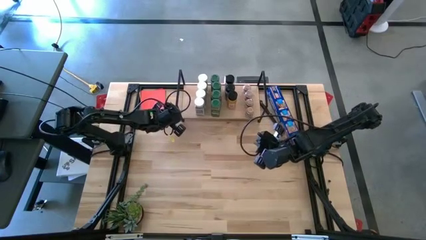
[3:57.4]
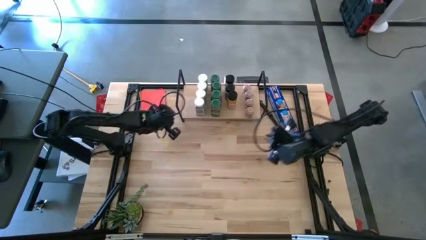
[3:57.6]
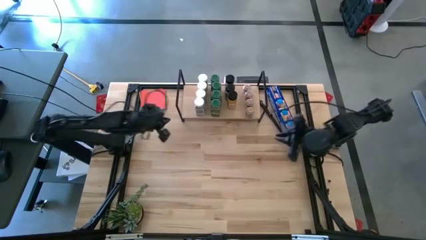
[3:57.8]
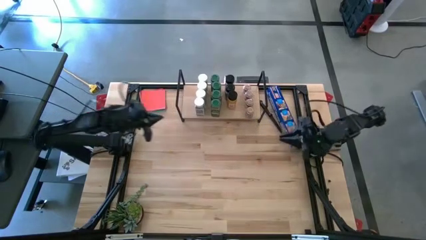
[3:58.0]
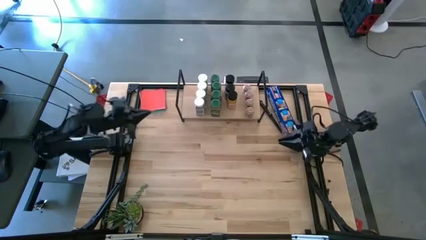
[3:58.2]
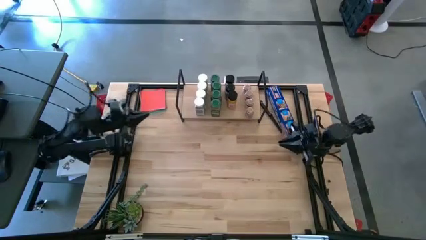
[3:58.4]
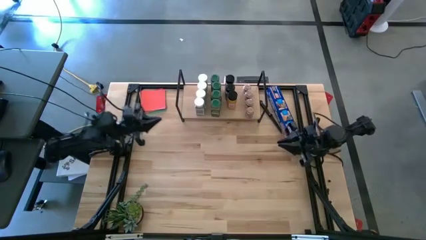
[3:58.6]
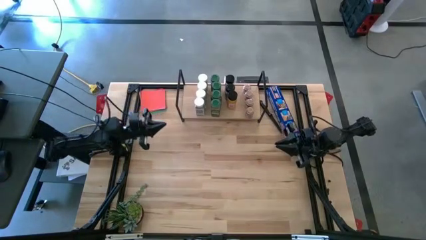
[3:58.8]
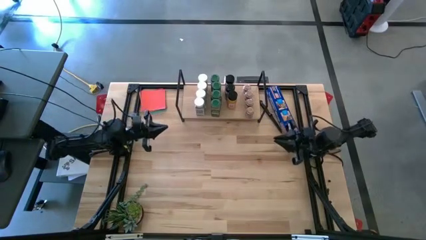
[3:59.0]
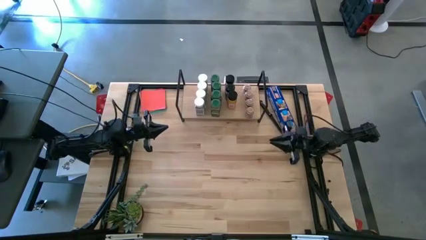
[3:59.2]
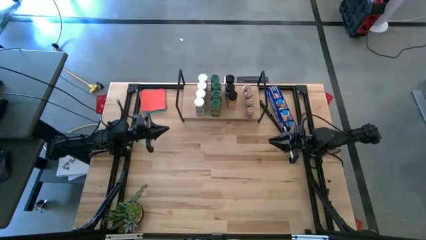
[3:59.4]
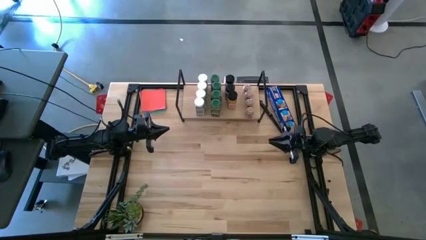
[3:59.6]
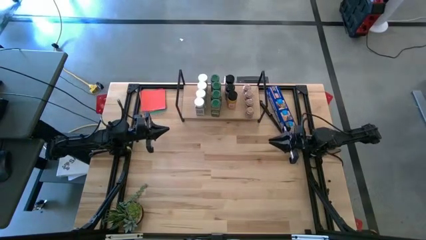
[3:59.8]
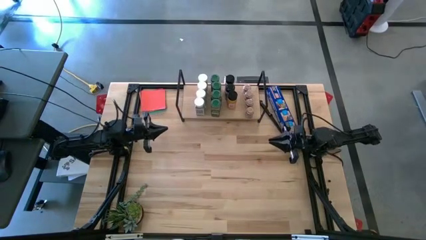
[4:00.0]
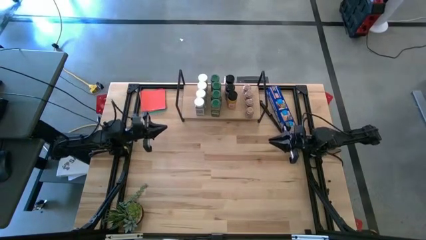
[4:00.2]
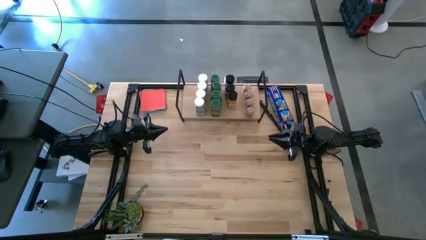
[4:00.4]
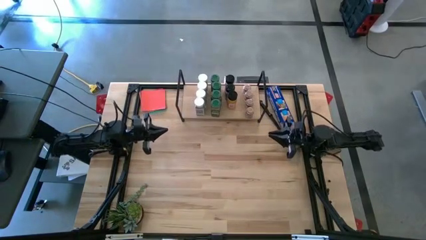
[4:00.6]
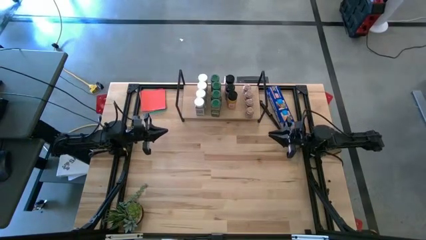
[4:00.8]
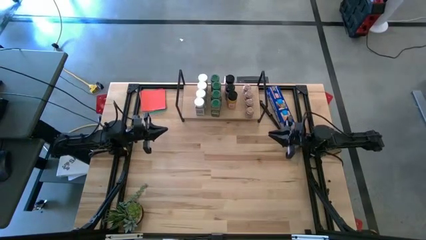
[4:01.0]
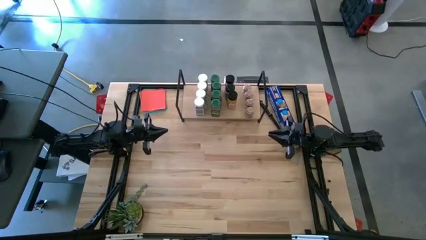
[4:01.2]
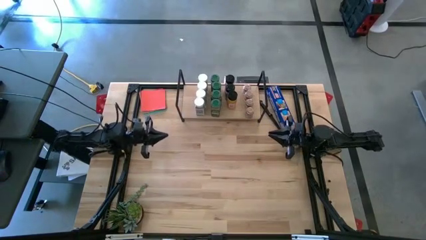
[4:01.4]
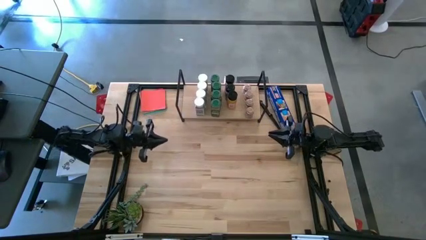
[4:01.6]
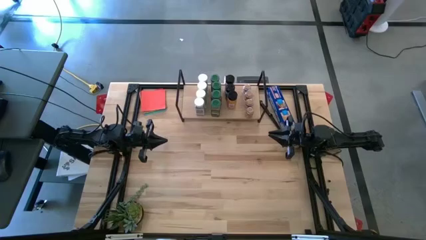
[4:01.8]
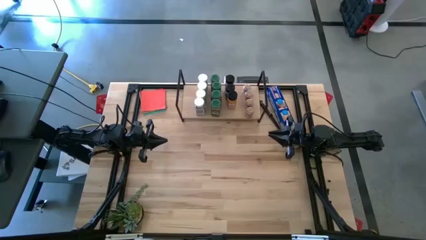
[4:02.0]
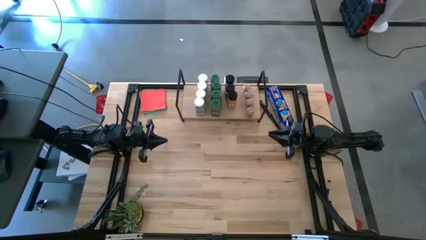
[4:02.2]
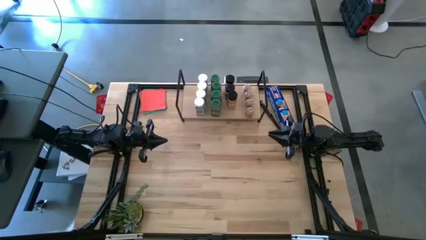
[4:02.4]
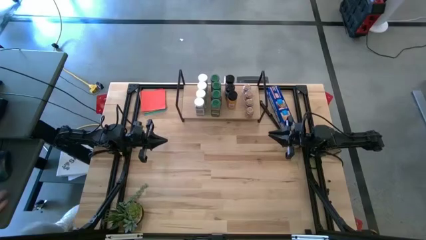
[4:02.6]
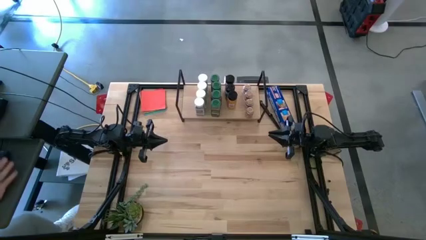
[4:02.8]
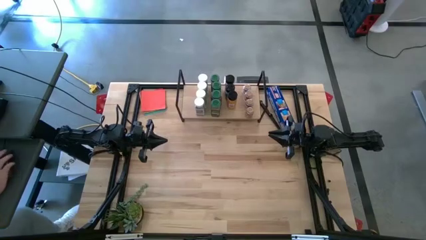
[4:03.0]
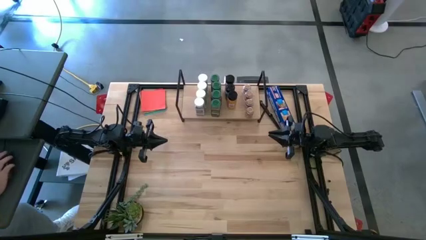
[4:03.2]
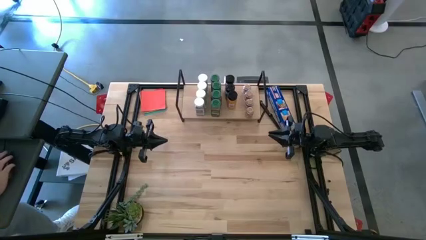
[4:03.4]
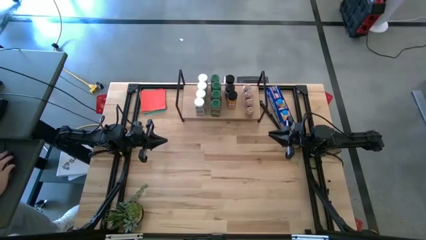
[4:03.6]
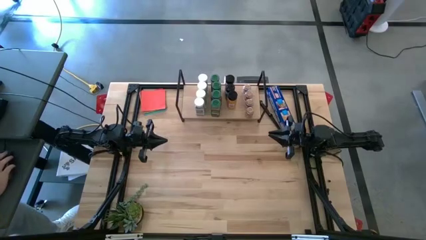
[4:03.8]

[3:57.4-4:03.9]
Task: Shelf spices
Return to Home Position

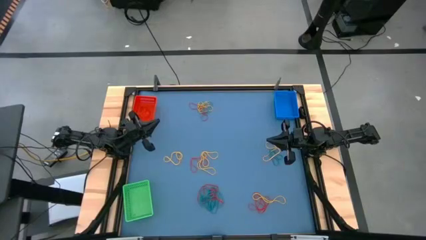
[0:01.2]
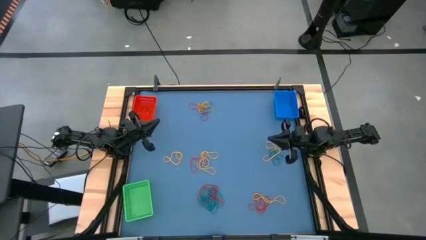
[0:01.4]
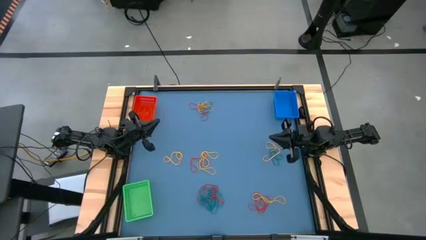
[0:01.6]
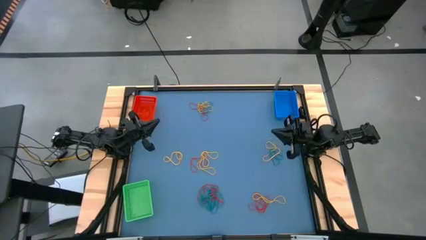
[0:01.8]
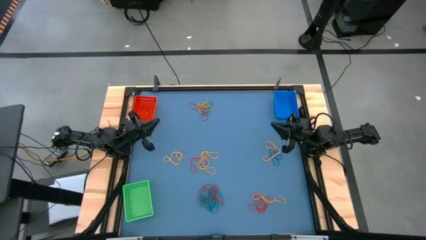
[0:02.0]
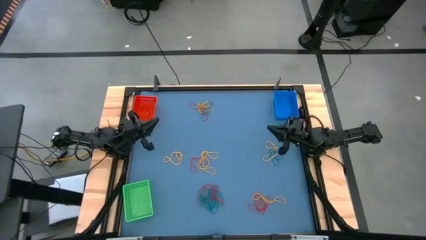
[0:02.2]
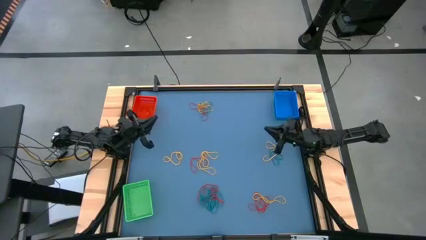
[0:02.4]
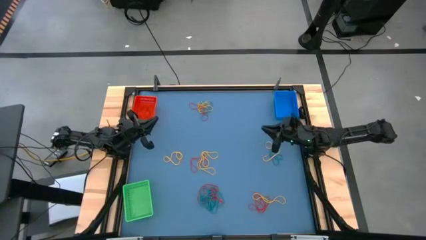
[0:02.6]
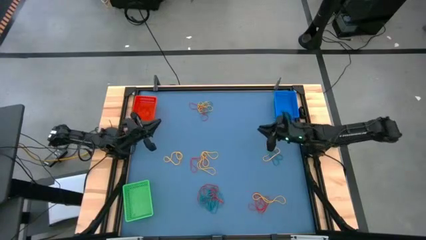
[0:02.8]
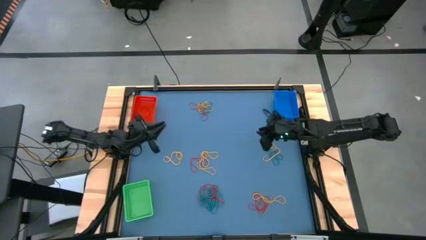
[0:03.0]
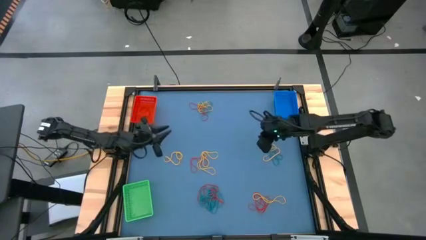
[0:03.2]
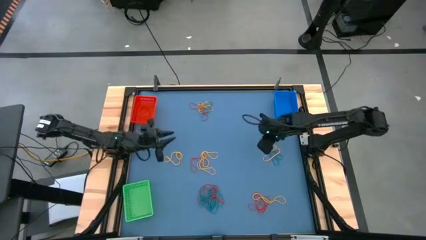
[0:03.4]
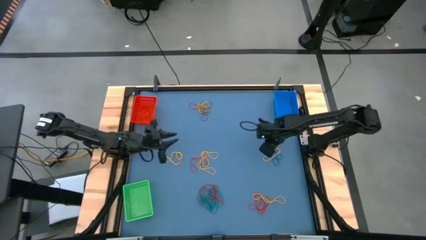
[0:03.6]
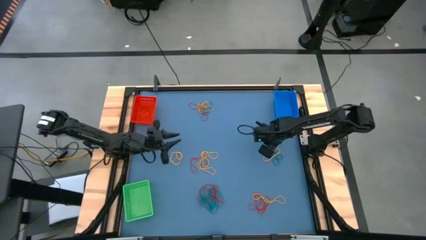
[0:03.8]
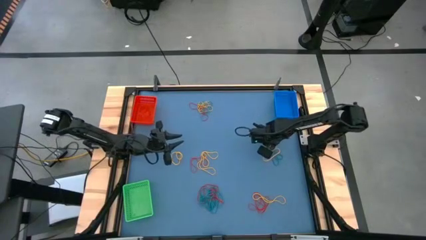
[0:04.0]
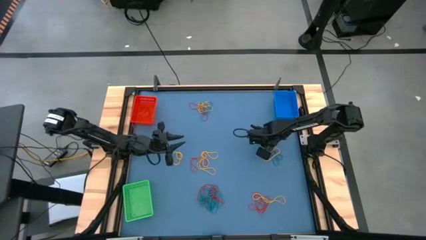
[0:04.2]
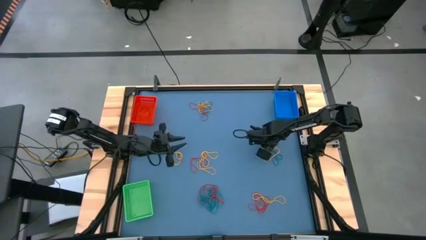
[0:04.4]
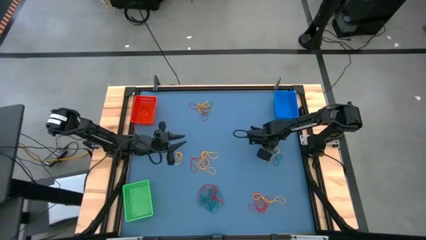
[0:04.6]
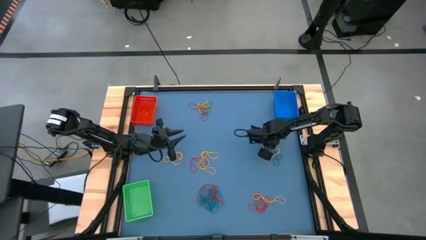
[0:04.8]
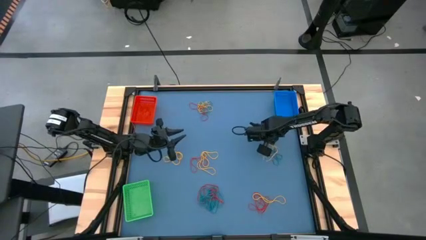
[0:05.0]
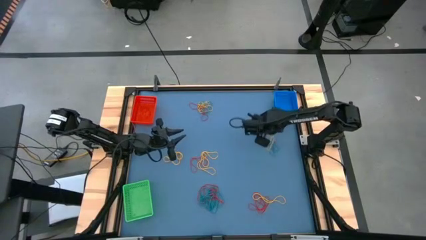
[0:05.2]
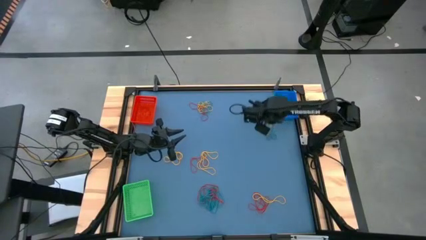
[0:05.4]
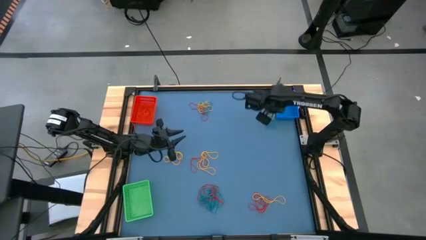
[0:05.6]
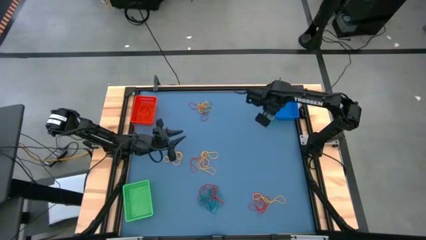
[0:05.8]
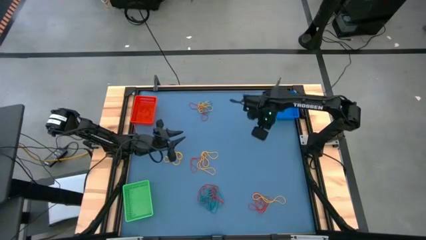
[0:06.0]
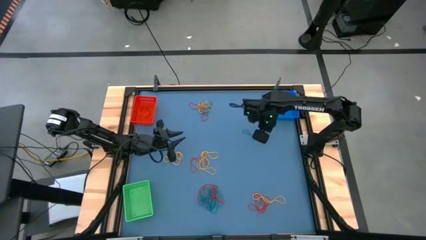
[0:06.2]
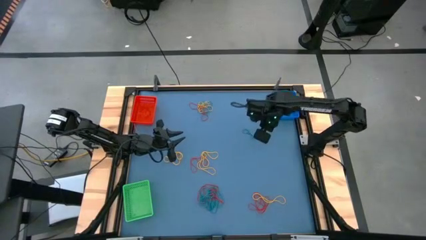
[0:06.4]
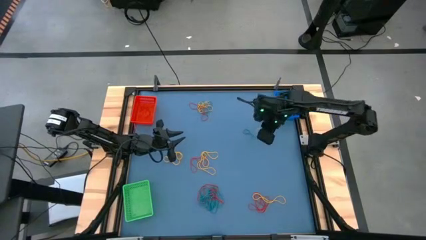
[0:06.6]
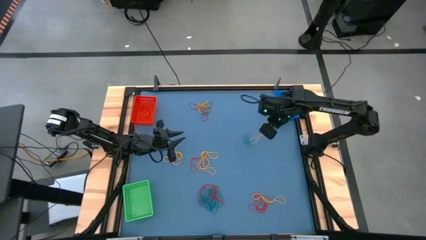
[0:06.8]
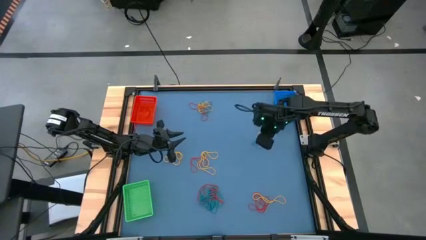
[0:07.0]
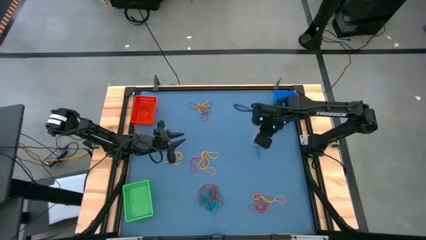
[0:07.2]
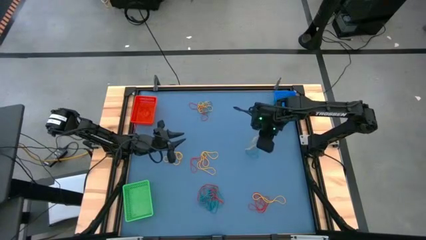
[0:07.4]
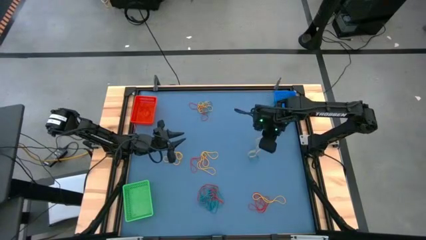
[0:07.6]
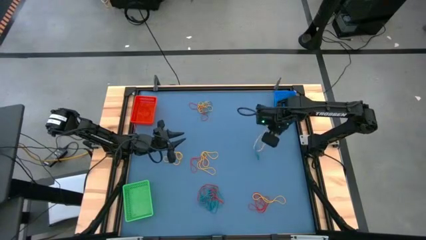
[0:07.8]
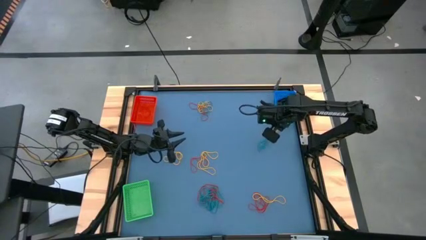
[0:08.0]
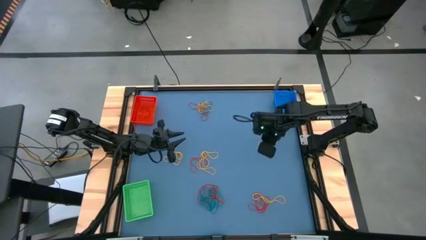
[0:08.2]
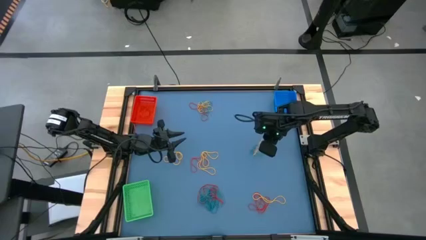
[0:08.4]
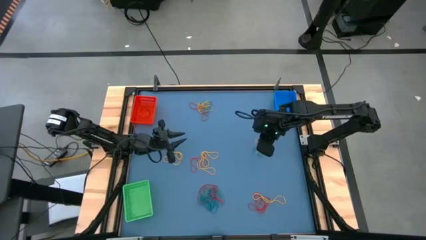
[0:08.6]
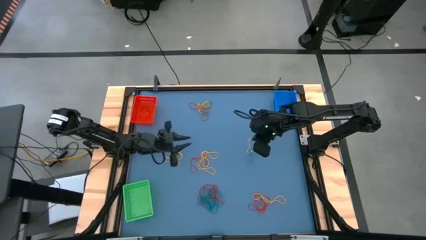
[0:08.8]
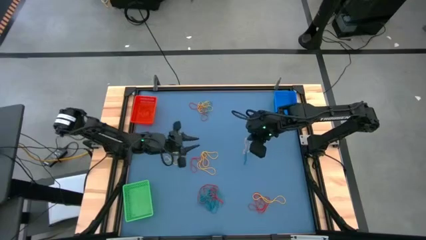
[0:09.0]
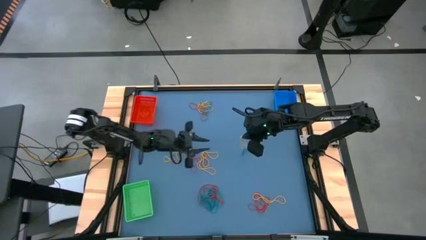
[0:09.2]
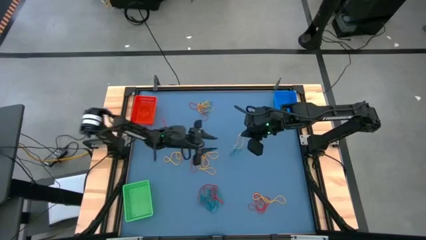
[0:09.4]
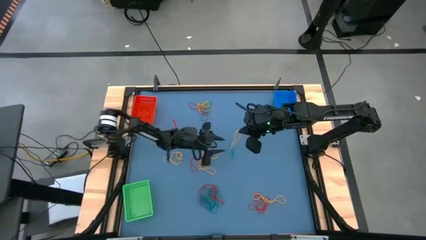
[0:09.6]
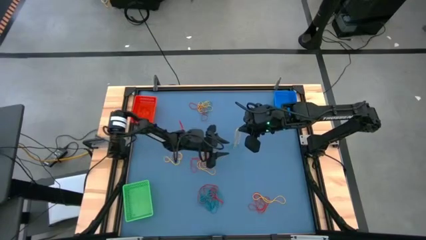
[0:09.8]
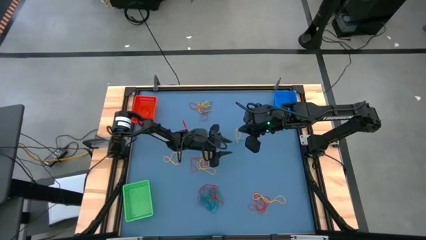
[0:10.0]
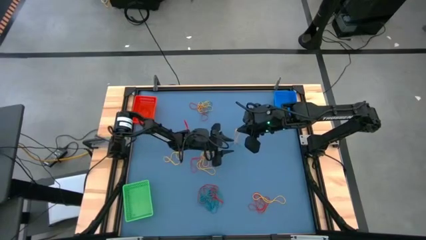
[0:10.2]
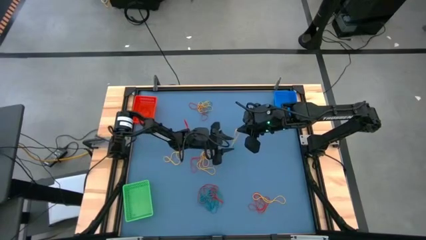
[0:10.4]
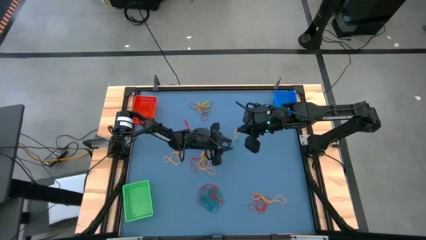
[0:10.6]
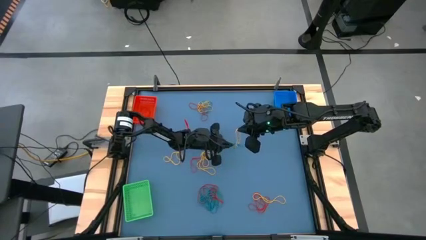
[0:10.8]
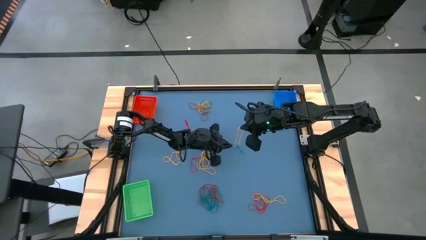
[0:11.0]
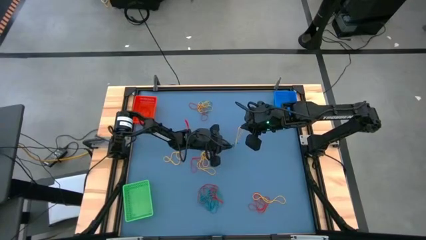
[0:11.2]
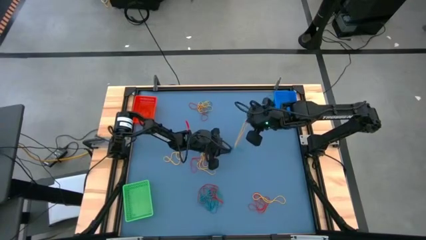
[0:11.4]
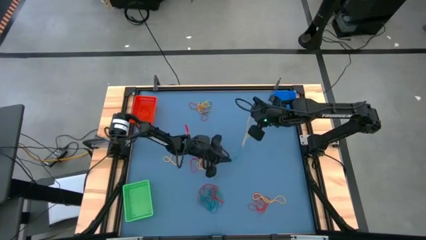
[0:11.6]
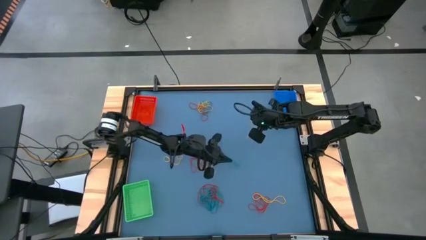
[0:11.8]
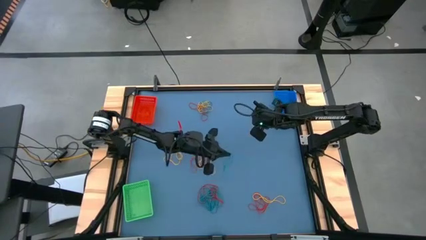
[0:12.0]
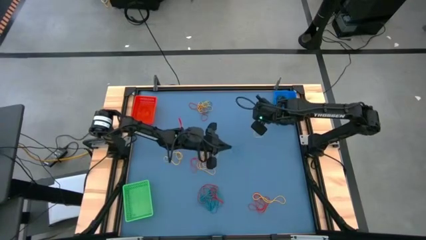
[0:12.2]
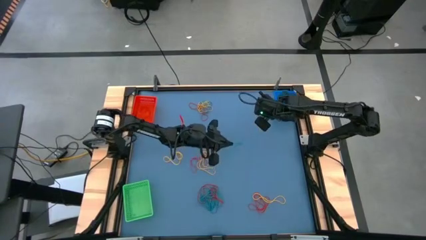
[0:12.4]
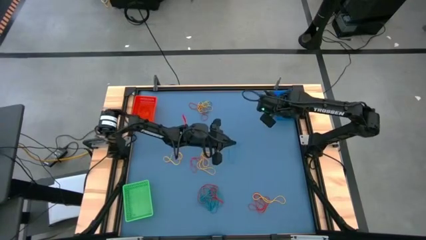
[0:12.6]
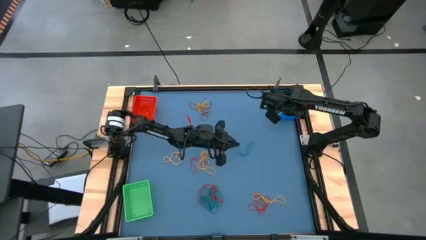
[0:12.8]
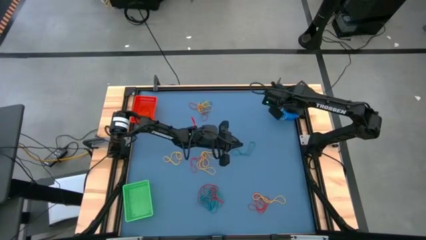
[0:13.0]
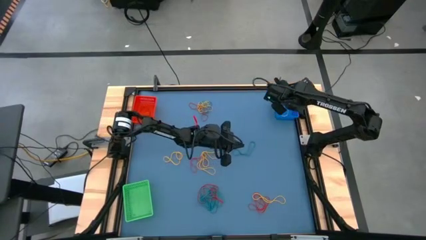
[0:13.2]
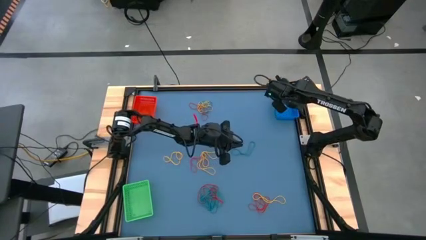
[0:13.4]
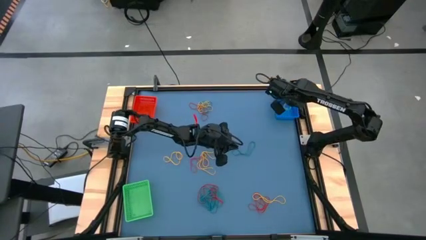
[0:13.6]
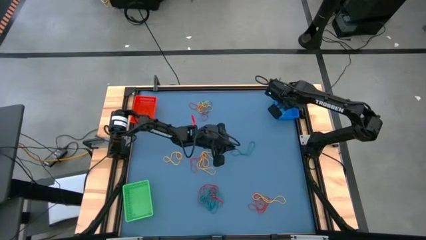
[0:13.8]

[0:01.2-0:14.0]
Task: Sort rubber bands into baskets
Put the yellow rubber band into the blue basket
